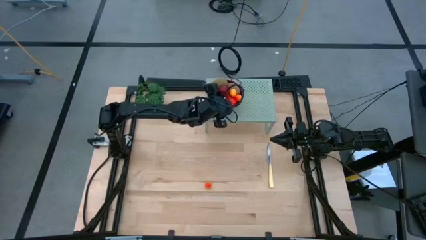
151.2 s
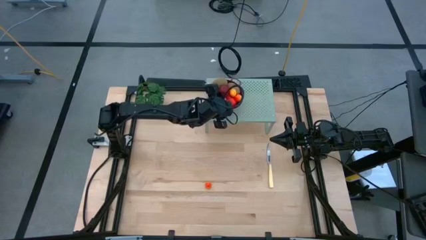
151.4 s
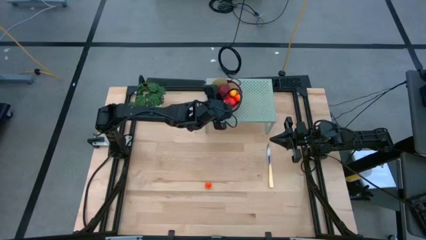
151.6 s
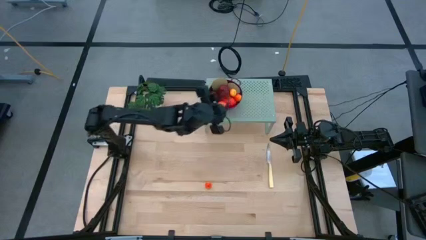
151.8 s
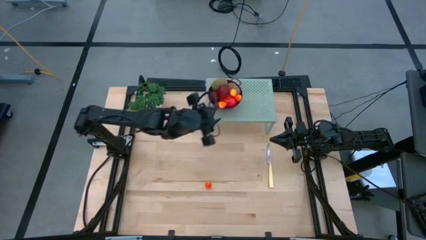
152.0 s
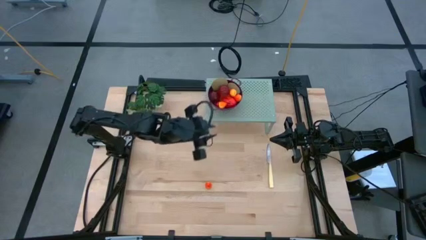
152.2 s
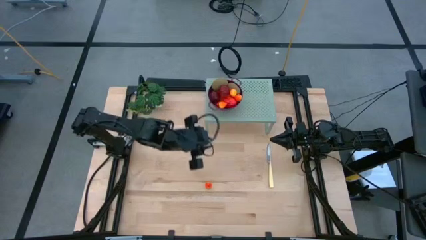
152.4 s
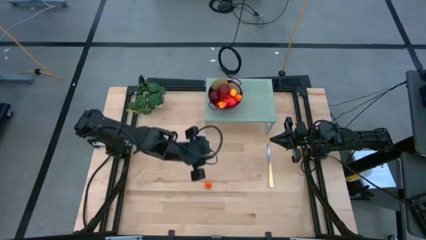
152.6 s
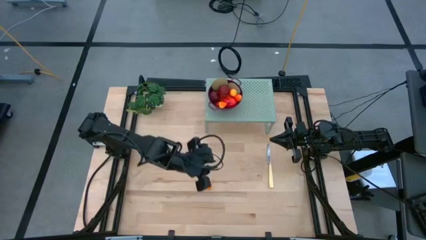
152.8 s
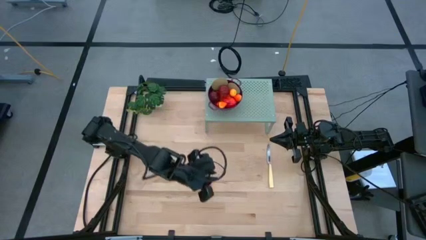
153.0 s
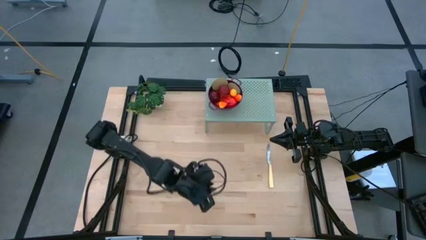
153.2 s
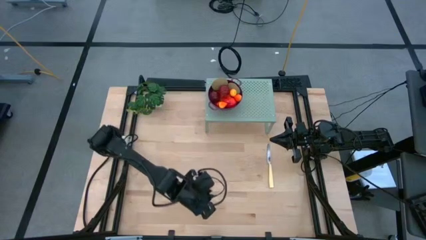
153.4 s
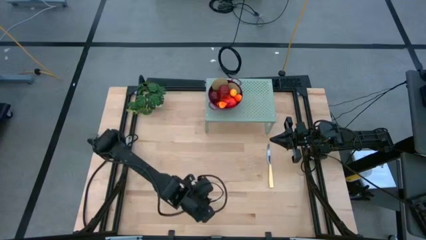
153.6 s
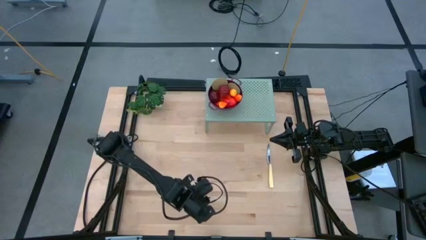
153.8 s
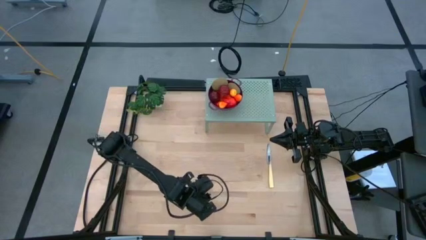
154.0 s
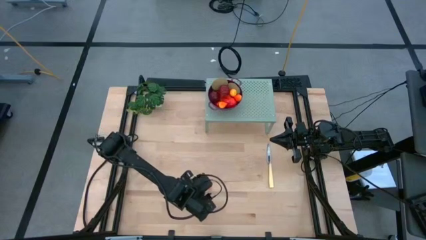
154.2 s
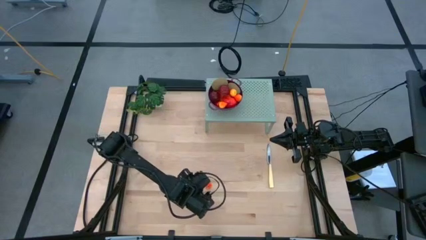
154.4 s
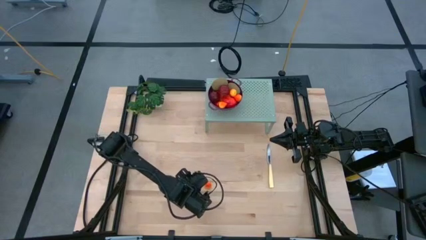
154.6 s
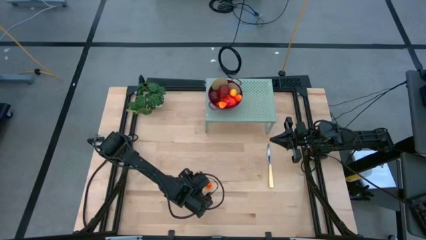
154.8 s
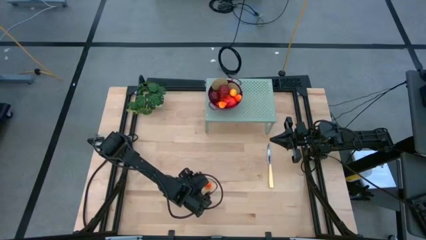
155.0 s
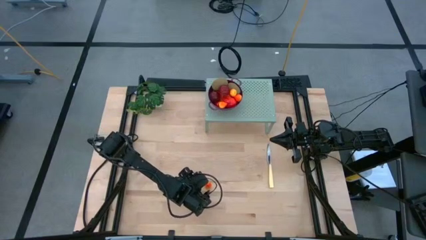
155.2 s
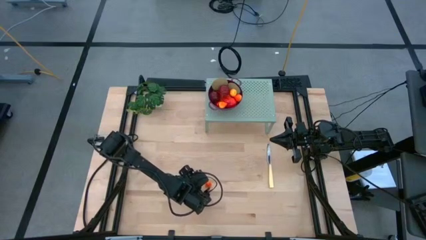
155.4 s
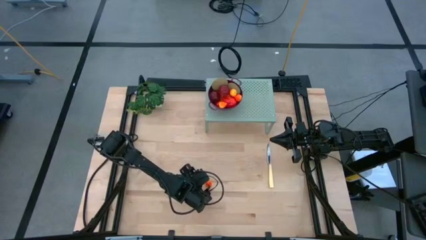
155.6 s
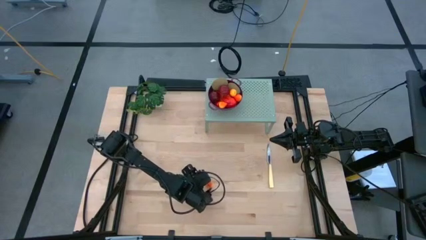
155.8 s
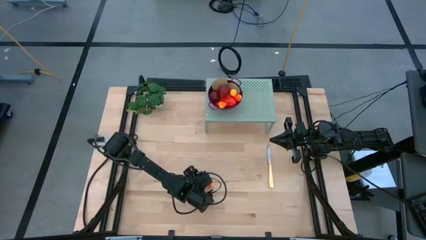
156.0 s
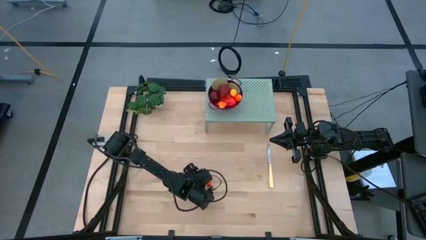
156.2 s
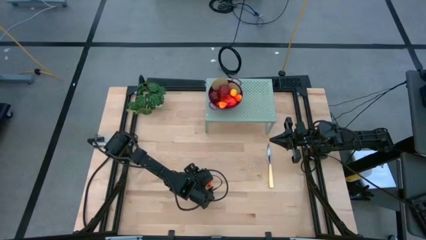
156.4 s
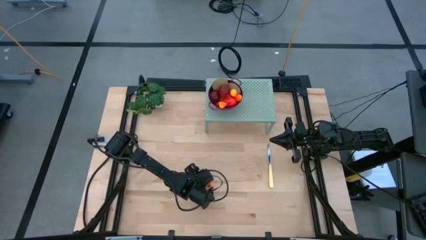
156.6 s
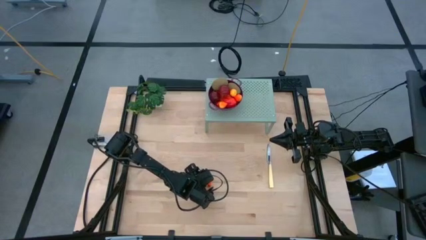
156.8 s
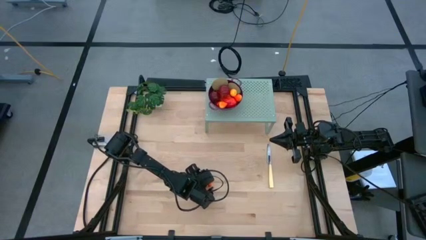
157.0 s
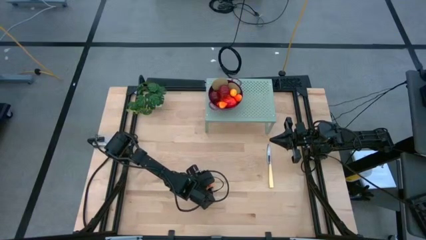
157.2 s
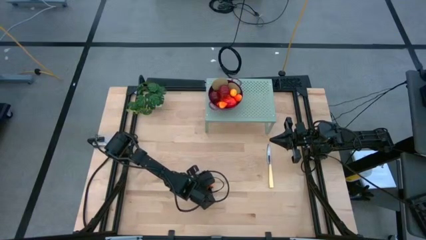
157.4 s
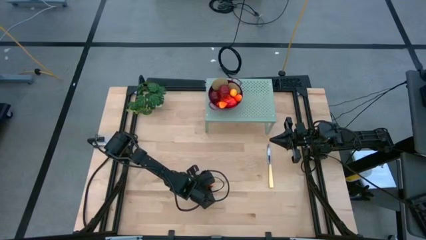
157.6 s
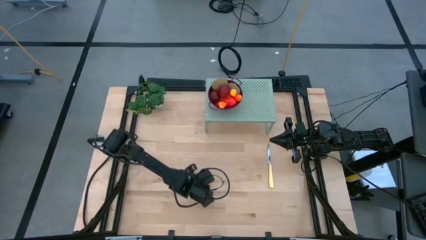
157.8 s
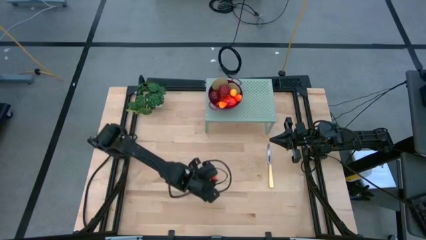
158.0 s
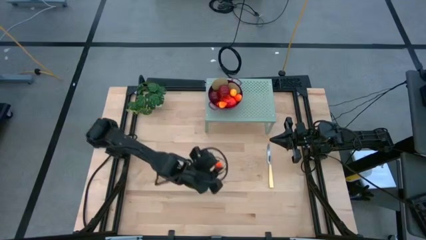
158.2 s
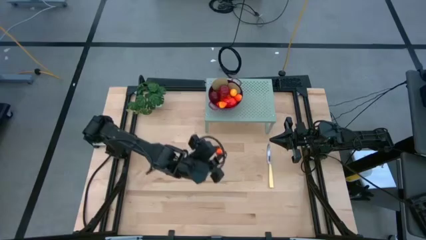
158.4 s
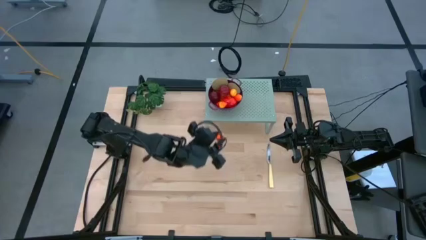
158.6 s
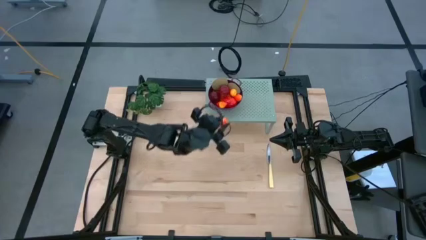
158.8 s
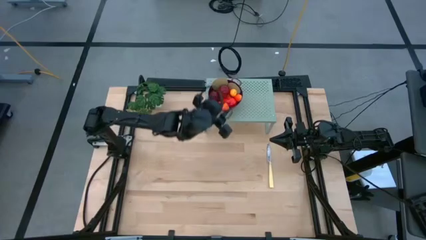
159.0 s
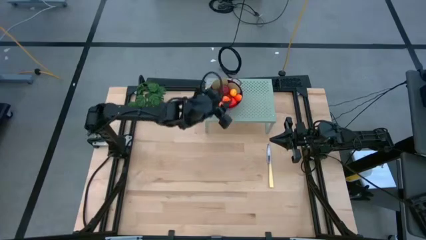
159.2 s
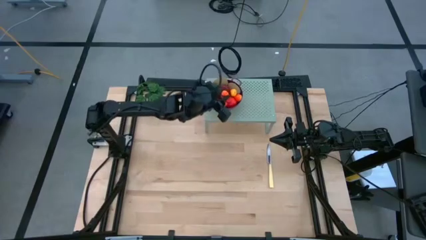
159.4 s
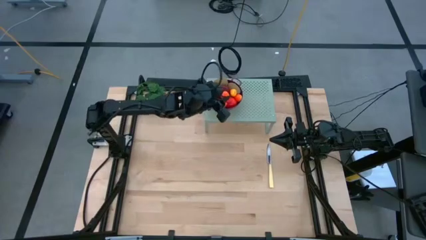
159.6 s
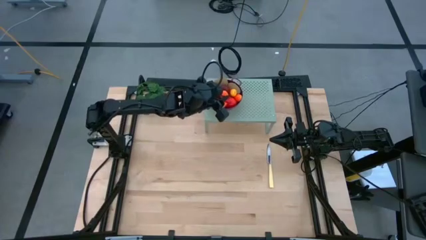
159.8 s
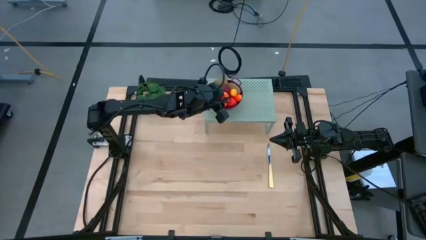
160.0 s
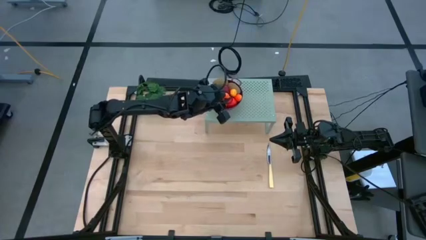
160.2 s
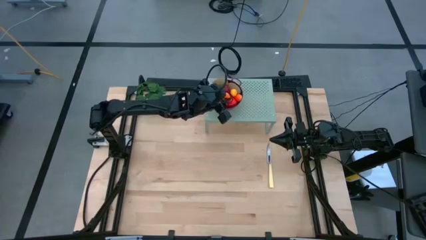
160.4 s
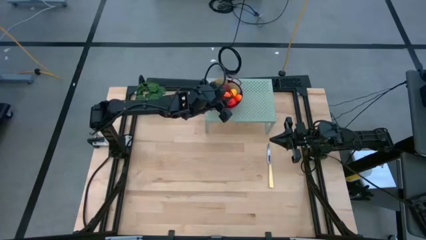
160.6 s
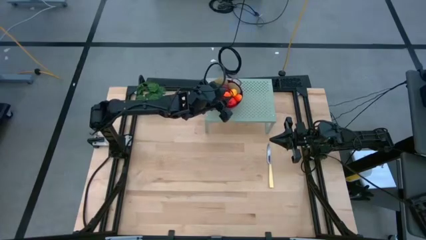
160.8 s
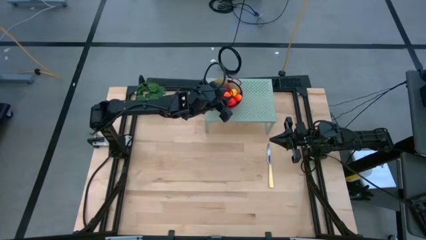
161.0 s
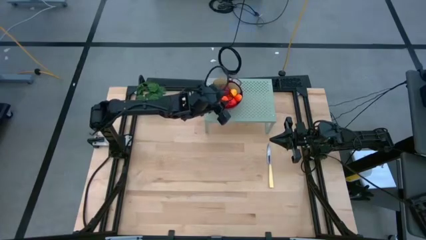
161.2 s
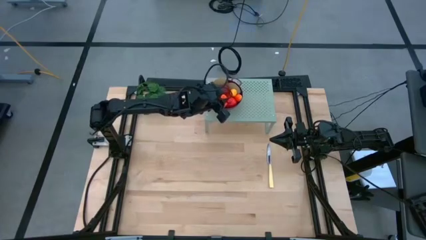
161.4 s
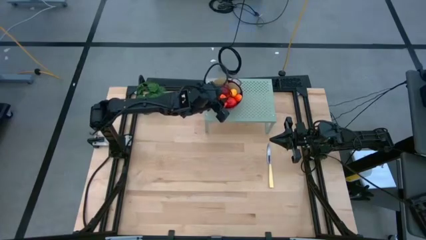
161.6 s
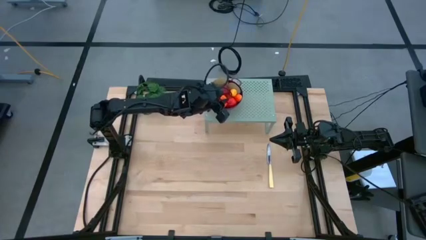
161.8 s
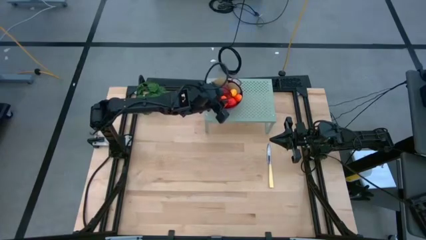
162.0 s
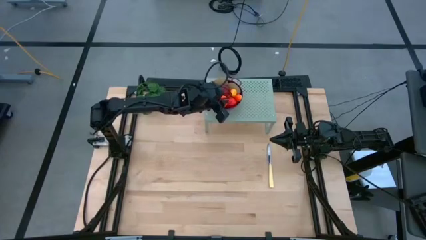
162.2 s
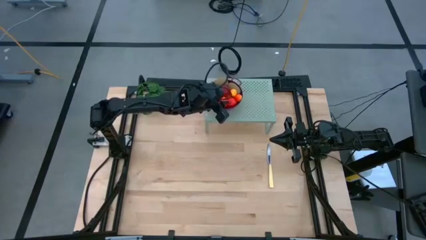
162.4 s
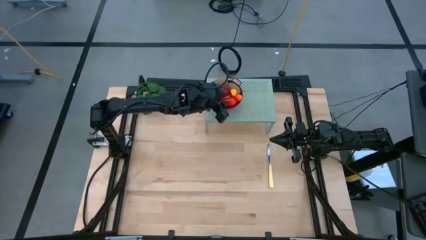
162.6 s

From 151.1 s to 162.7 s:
Task: Pick & Place Fruit
Put the pear into the dark red colander on the shelf
